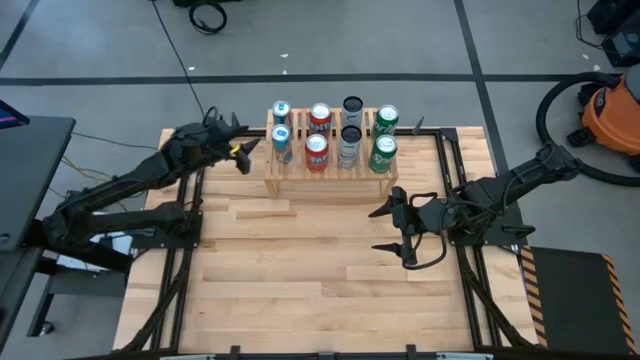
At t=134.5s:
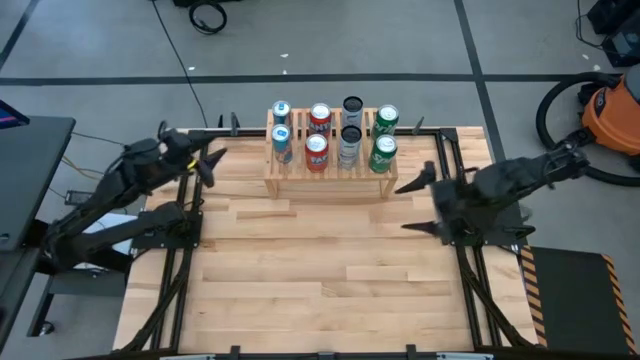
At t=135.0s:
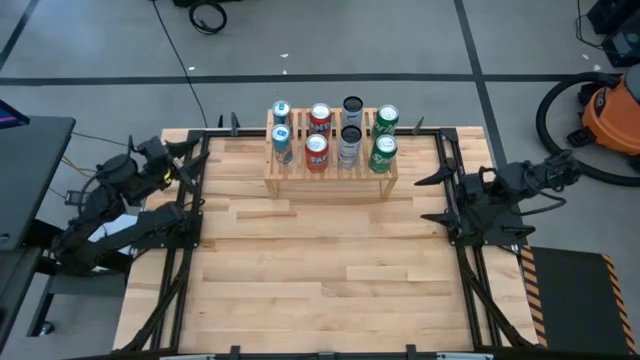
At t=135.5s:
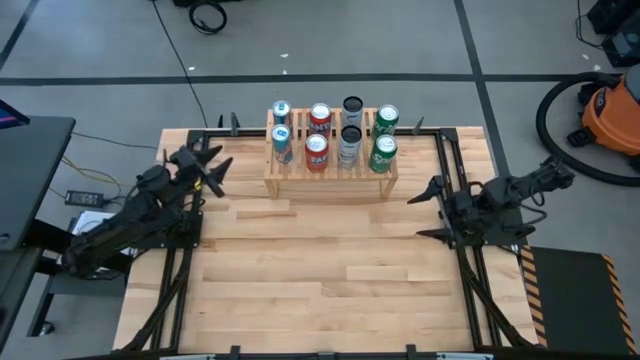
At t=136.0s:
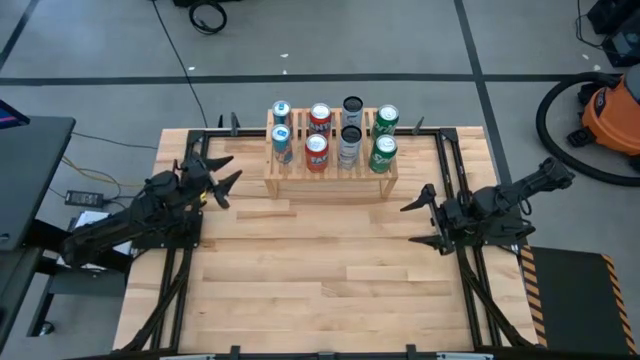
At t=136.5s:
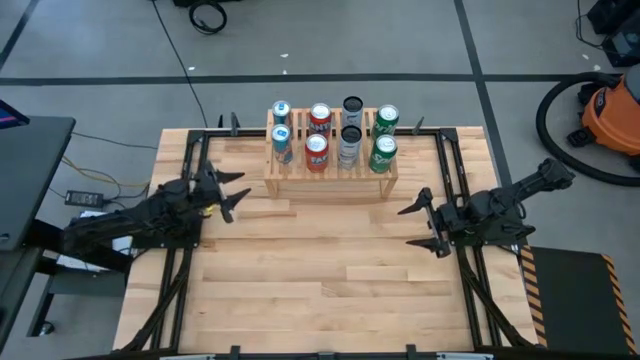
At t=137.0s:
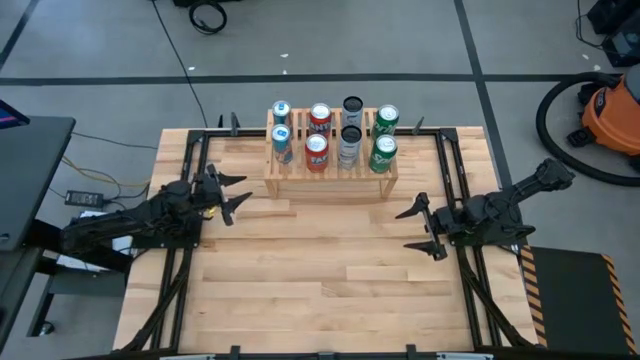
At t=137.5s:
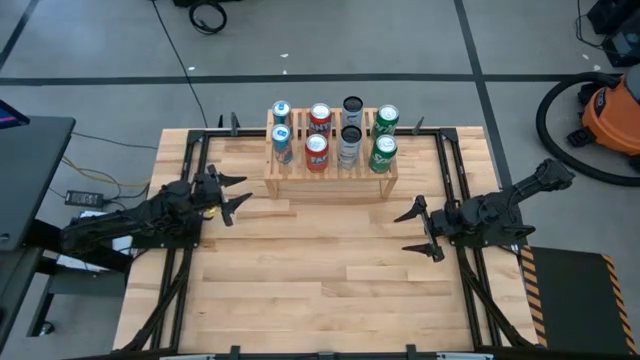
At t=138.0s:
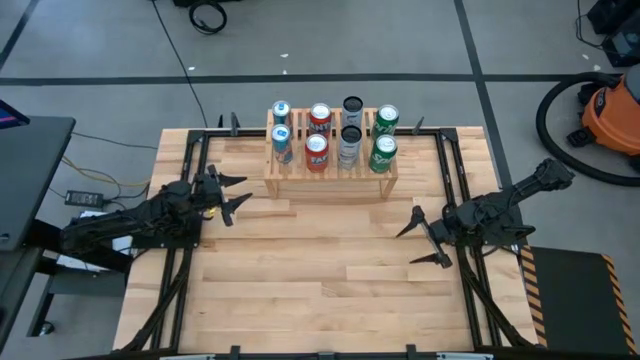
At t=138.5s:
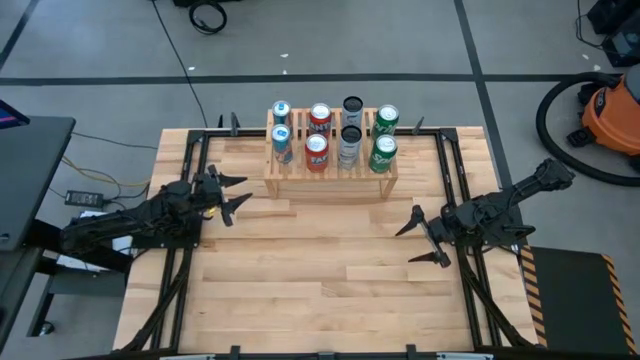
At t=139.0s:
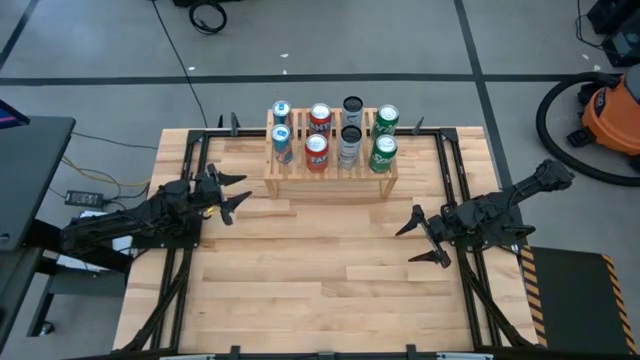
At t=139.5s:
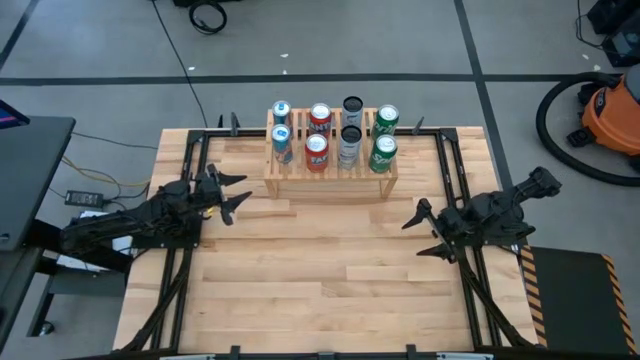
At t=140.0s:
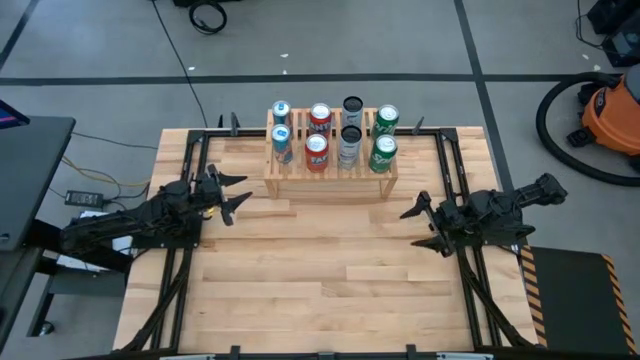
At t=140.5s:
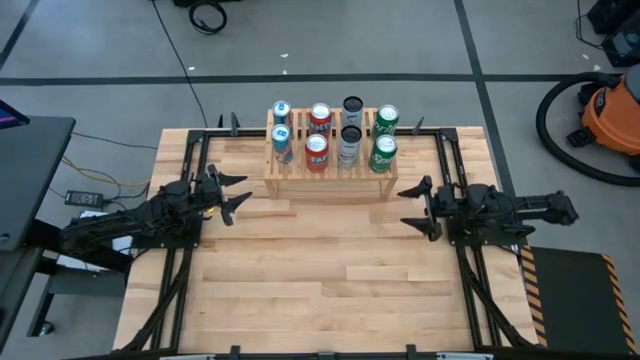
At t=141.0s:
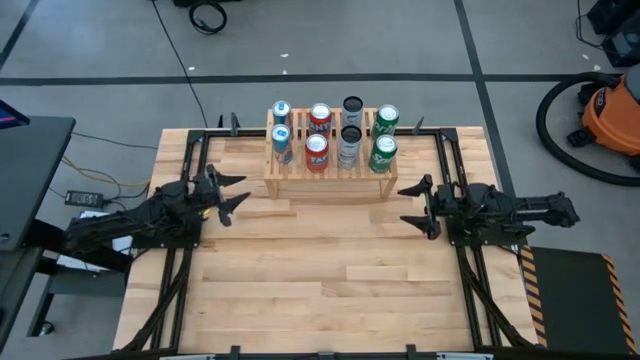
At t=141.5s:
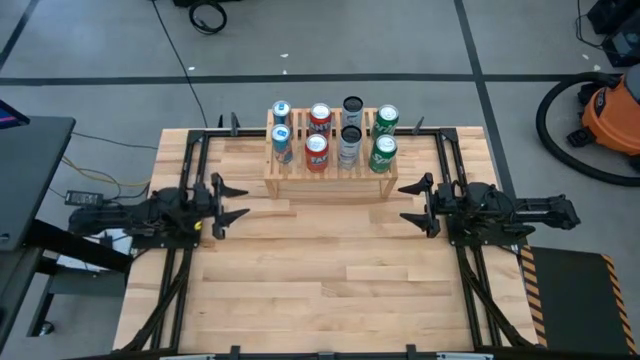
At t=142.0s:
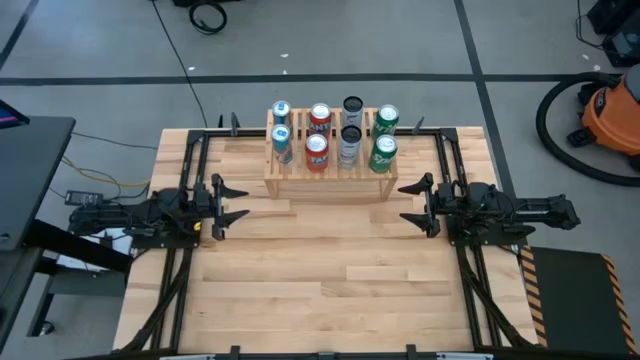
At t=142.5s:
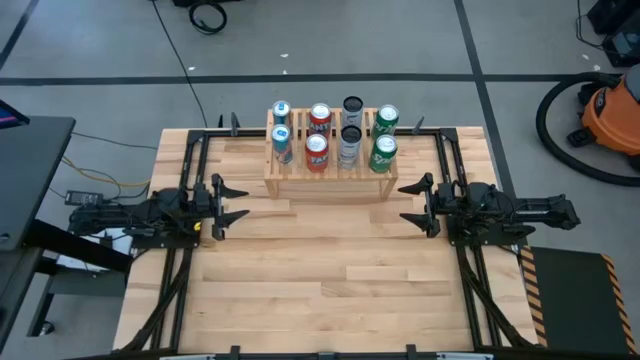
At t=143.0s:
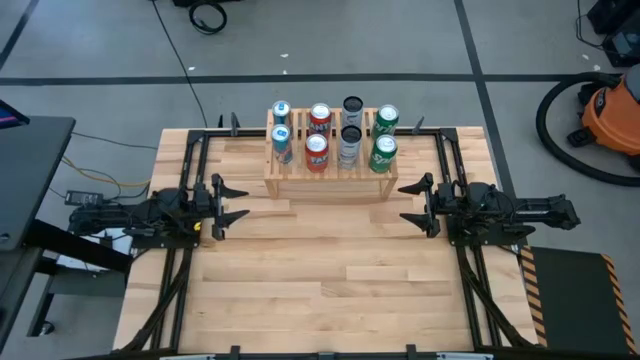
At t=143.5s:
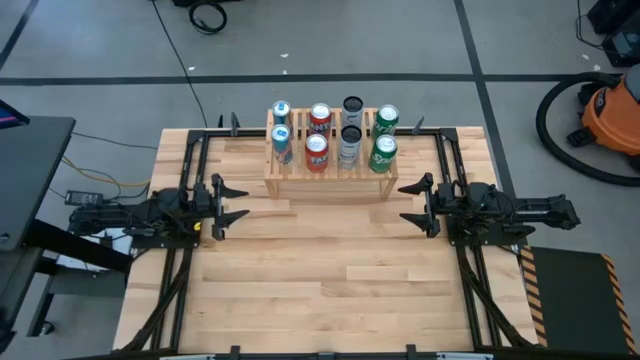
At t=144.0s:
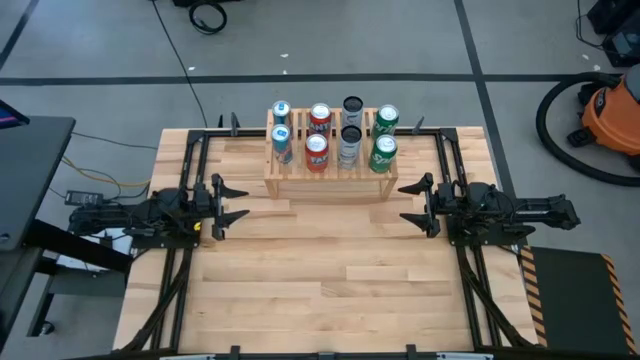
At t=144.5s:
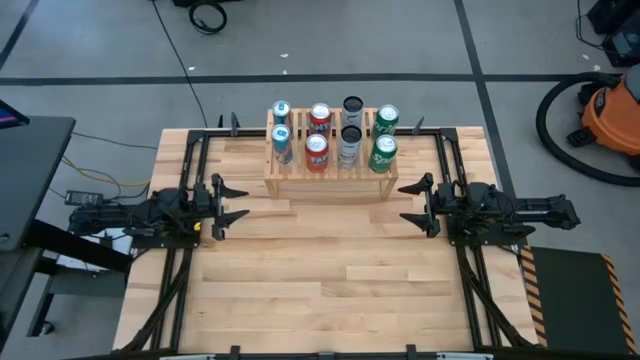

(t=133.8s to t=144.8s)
Task: Place canned beverage on shelf
Return to Home Position

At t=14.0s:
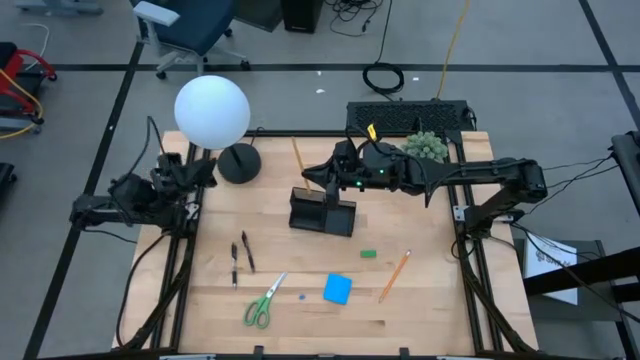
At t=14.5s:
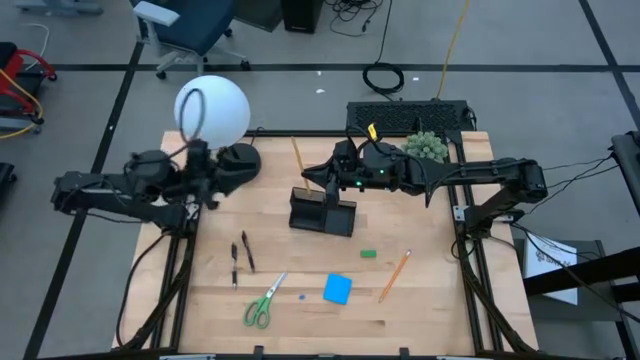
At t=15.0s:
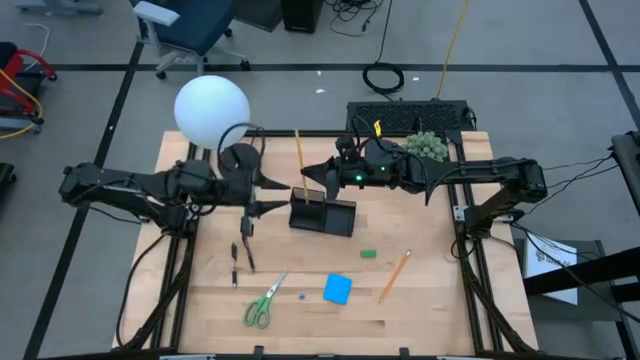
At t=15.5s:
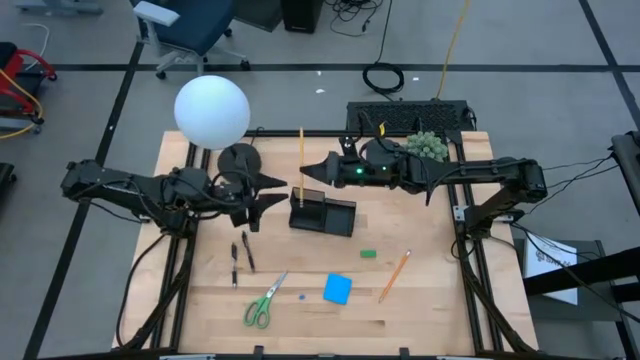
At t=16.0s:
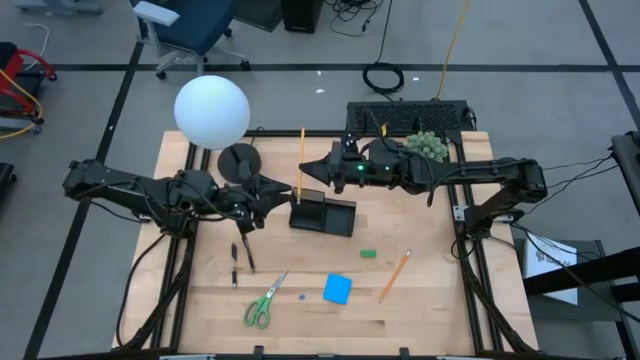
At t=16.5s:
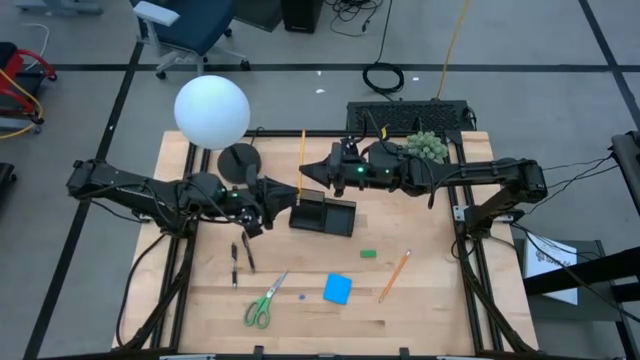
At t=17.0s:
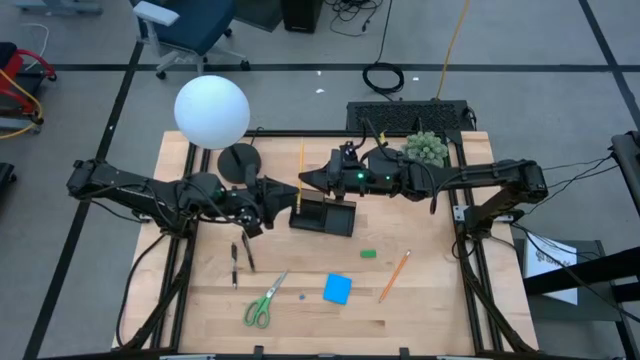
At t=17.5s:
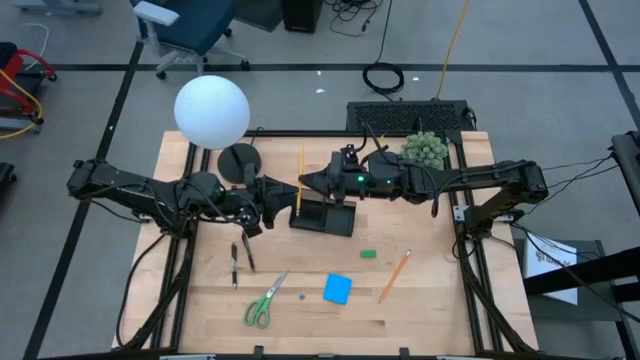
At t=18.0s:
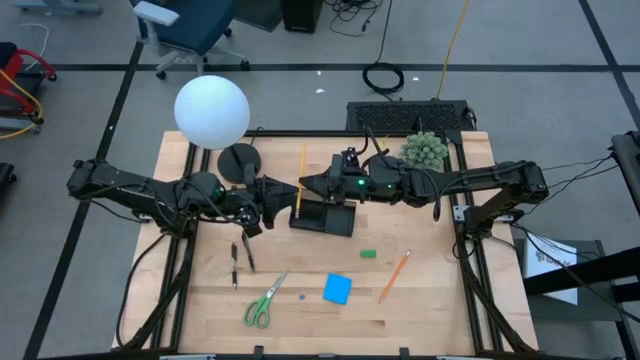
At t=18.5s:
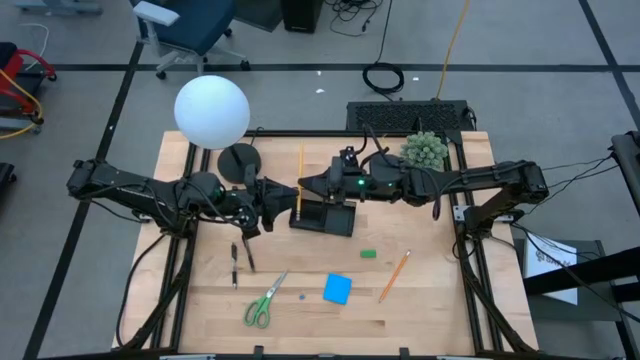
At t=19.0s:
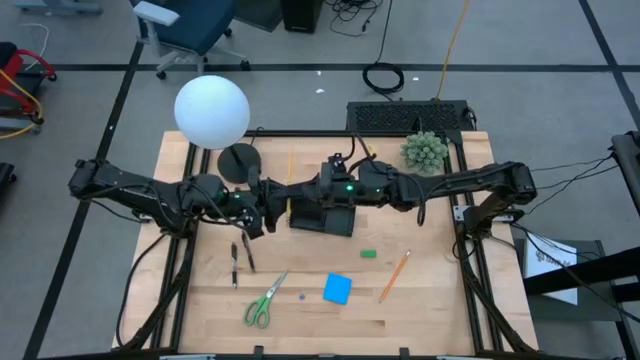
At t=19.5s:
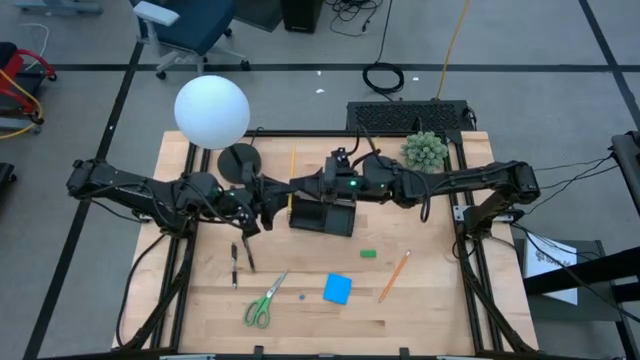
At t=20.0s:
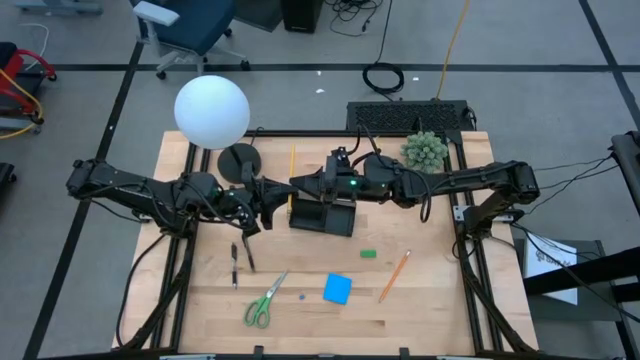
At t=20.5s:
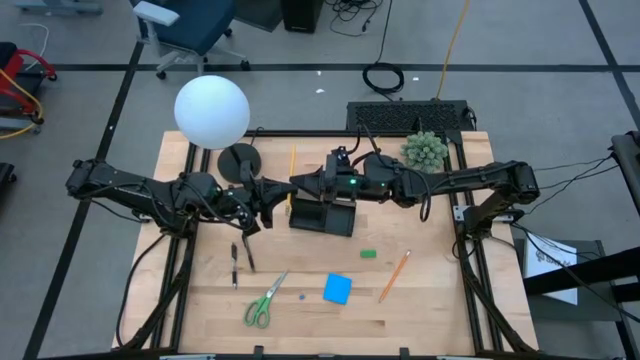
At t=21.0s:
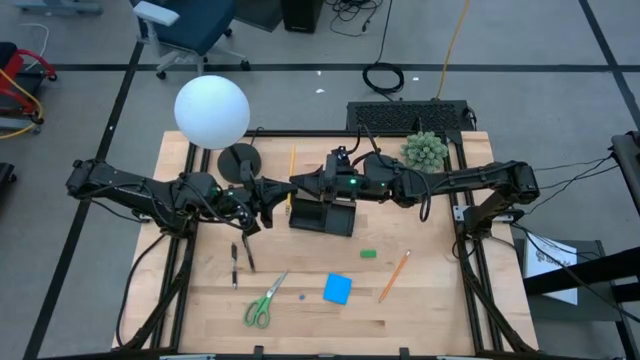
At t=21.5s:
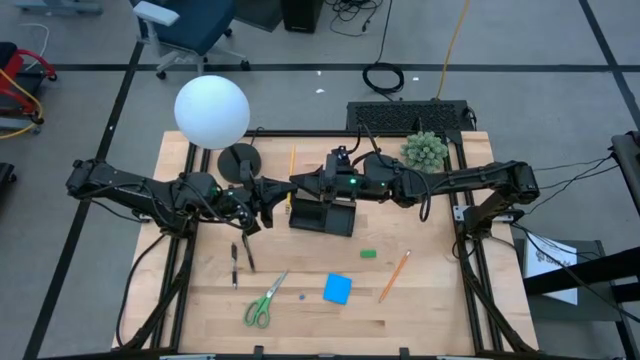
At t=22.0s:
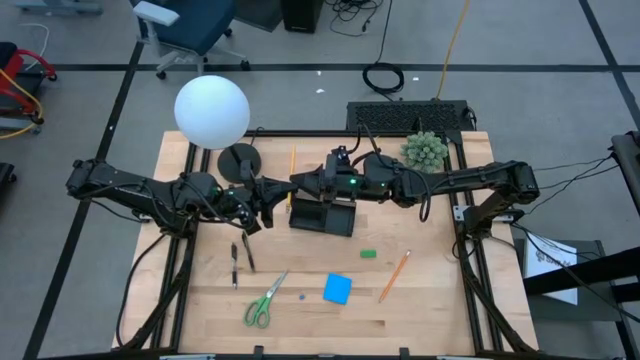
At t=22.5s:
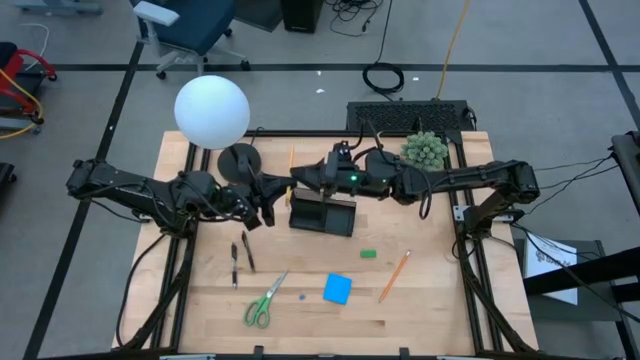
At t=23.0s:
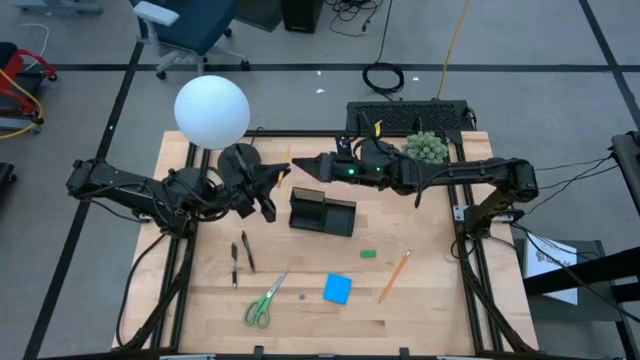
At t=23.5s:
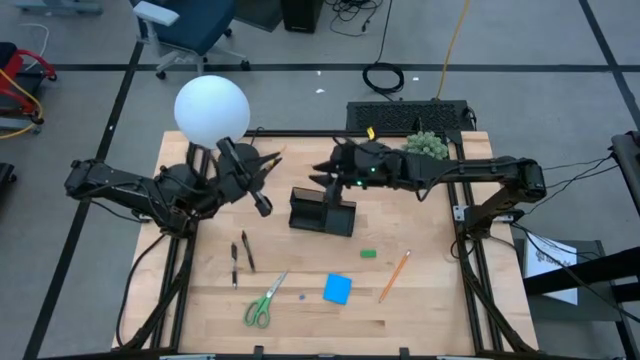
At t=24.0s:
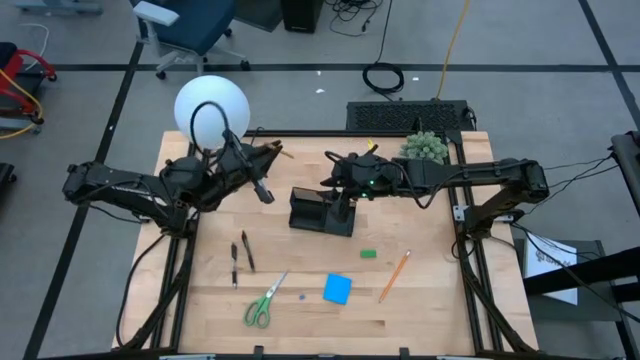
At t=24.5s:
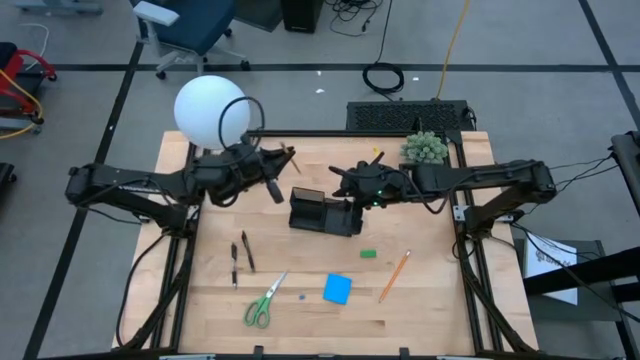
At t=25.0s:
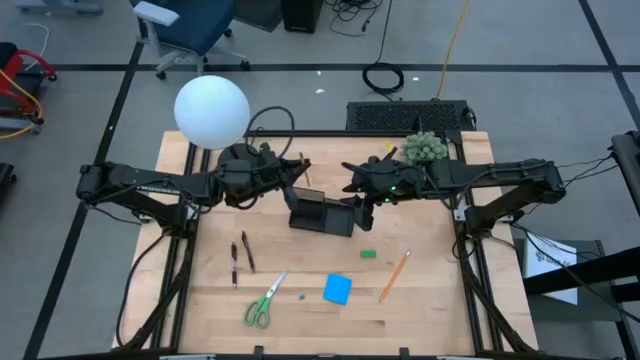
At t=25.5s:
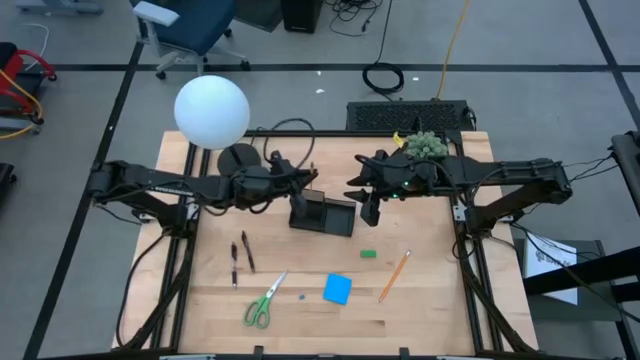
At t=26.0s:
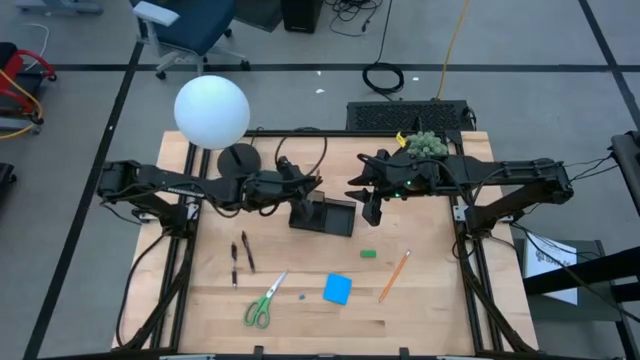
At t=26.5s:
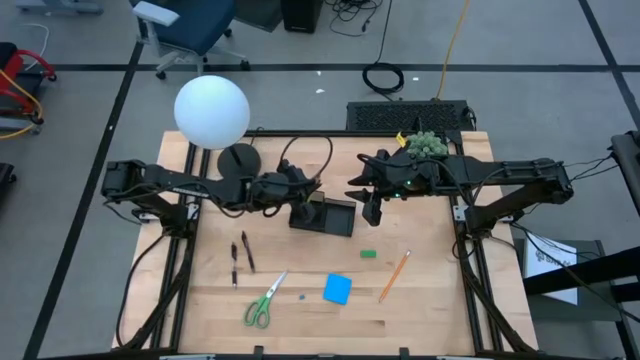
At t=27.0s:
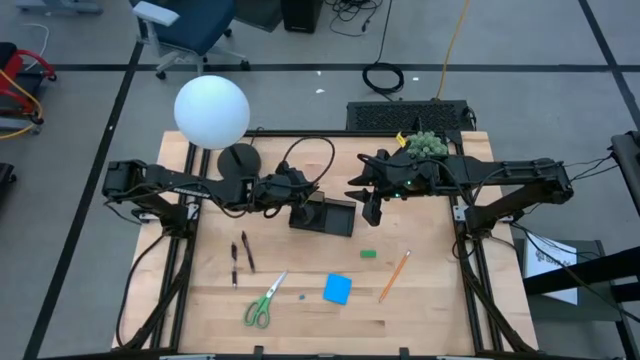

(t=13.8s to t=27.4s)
Task: Pick and place office supplies into organizer
Put the yellow pencil into the desk organizer
